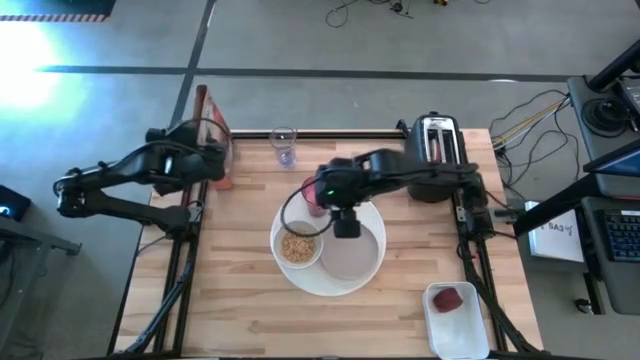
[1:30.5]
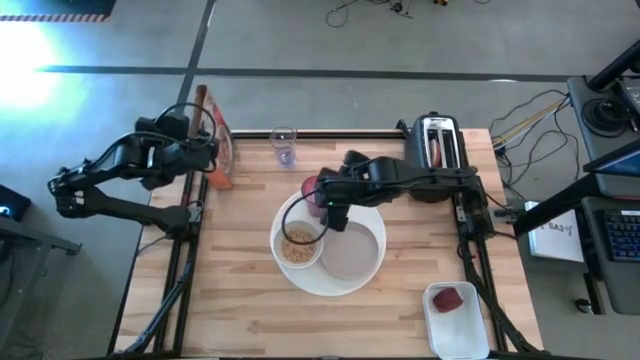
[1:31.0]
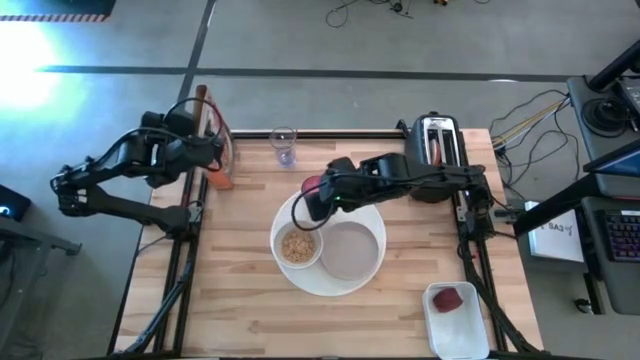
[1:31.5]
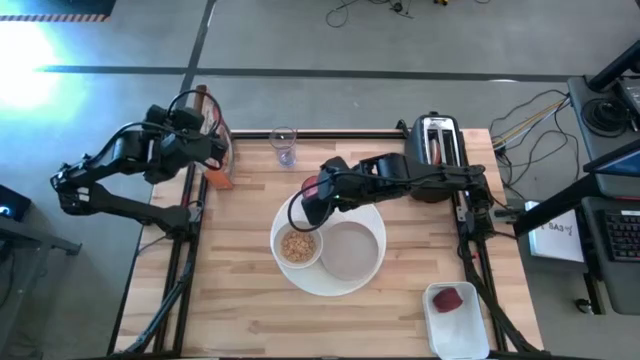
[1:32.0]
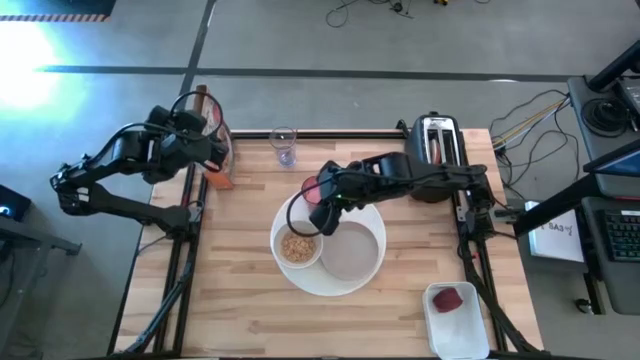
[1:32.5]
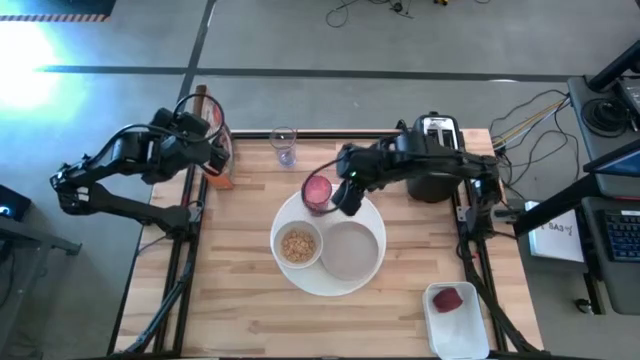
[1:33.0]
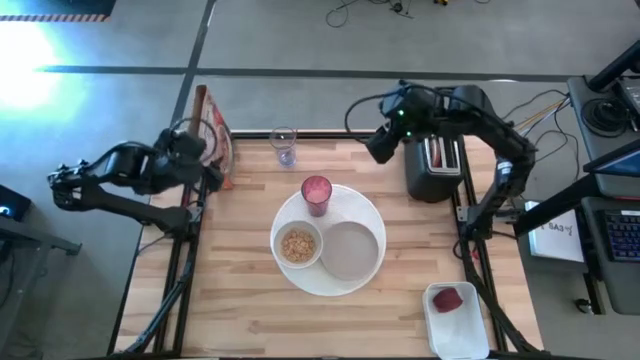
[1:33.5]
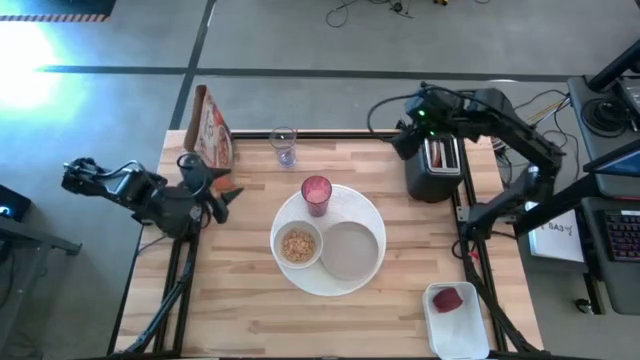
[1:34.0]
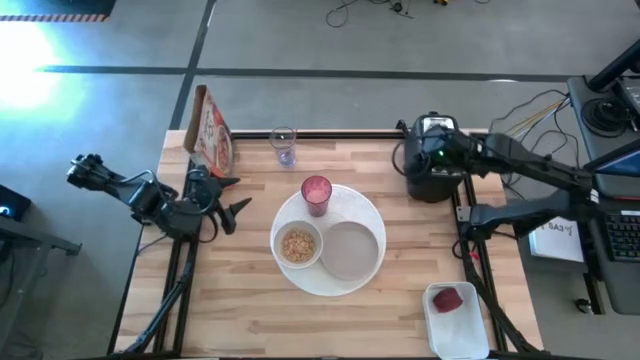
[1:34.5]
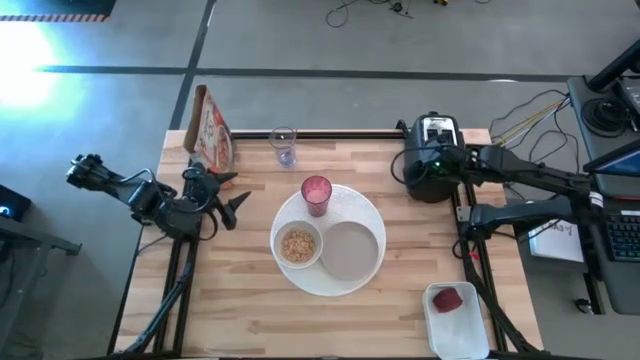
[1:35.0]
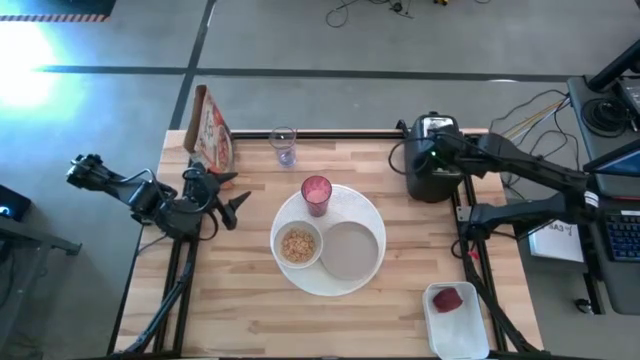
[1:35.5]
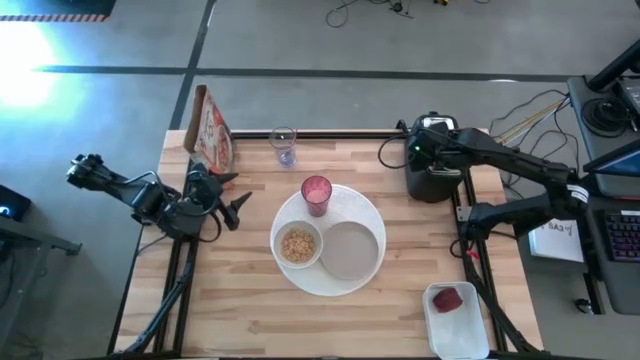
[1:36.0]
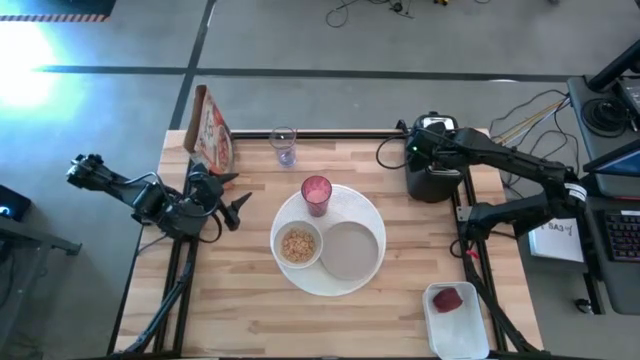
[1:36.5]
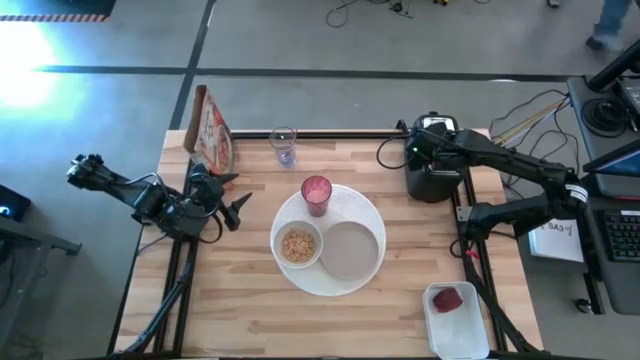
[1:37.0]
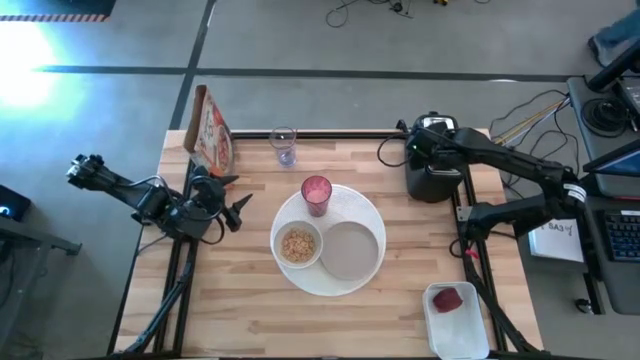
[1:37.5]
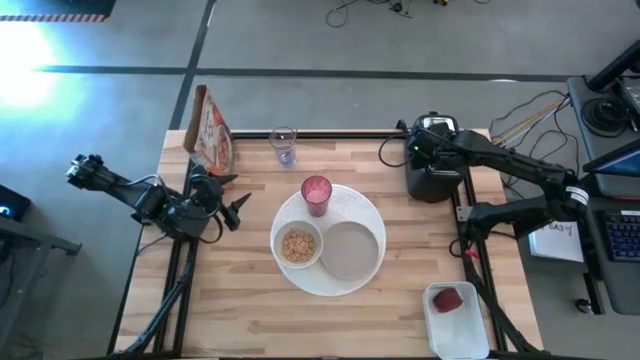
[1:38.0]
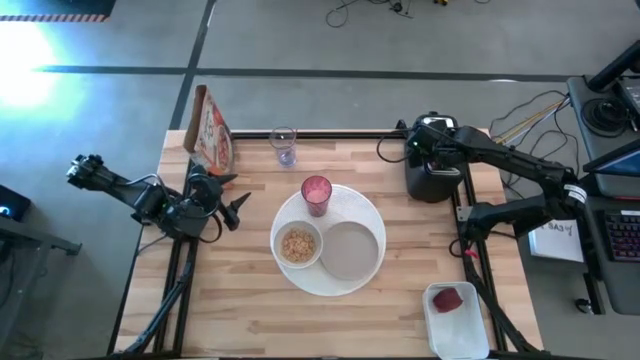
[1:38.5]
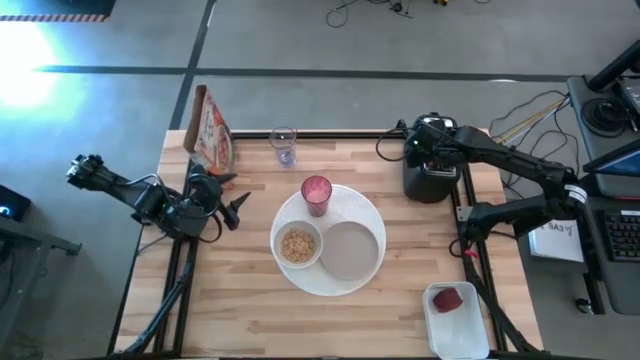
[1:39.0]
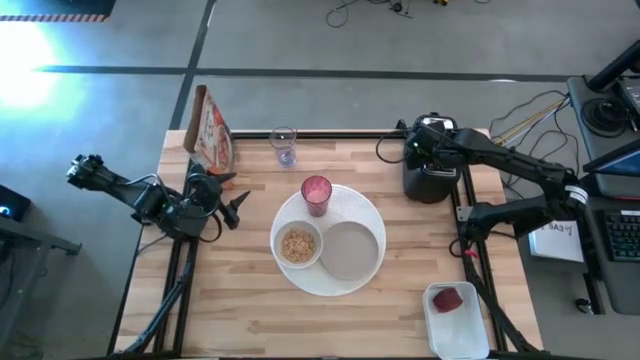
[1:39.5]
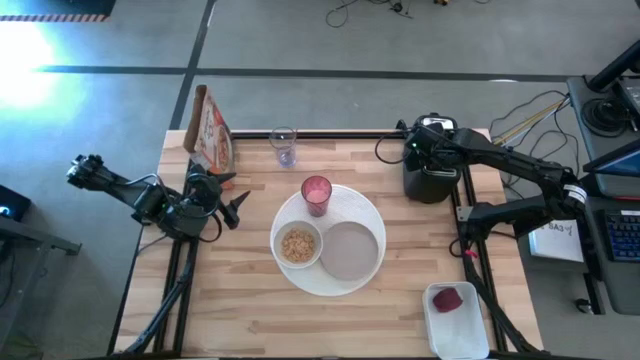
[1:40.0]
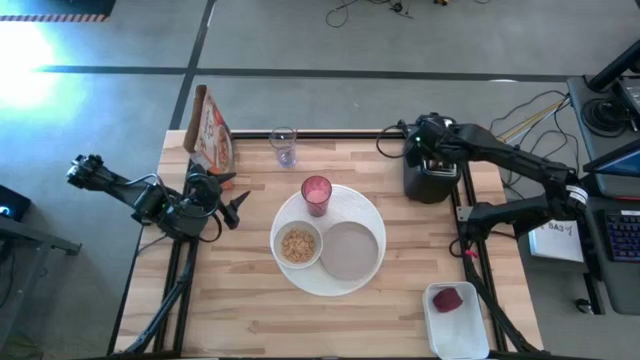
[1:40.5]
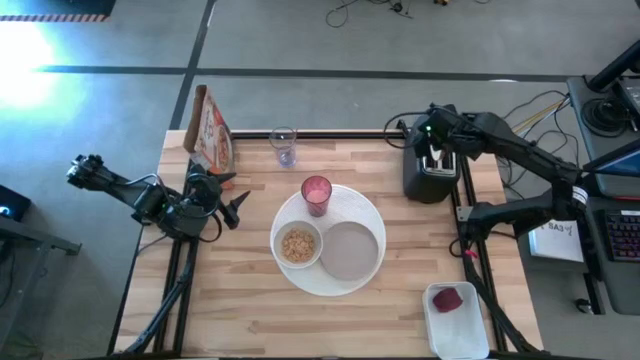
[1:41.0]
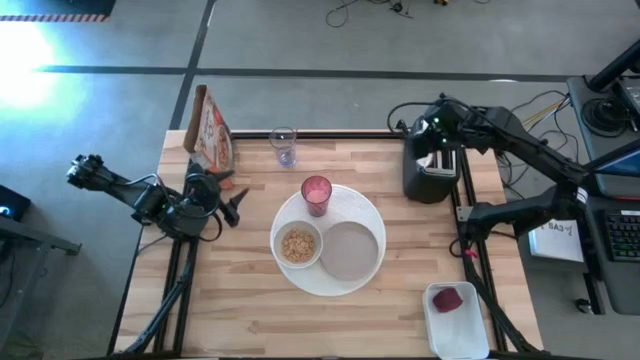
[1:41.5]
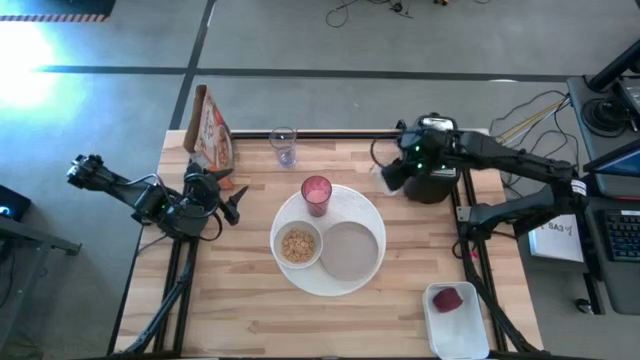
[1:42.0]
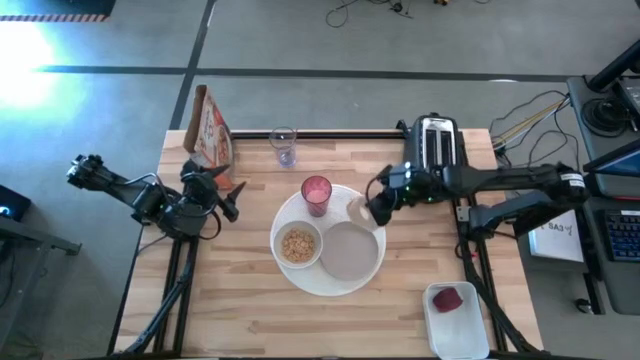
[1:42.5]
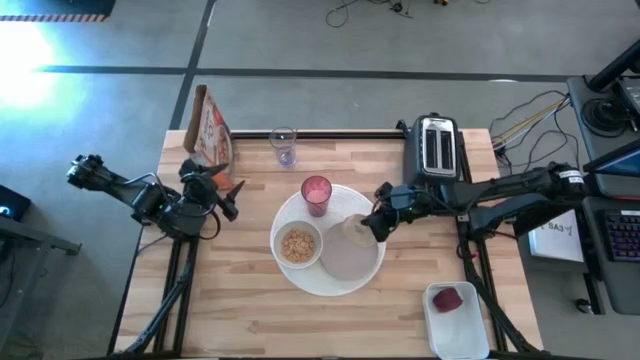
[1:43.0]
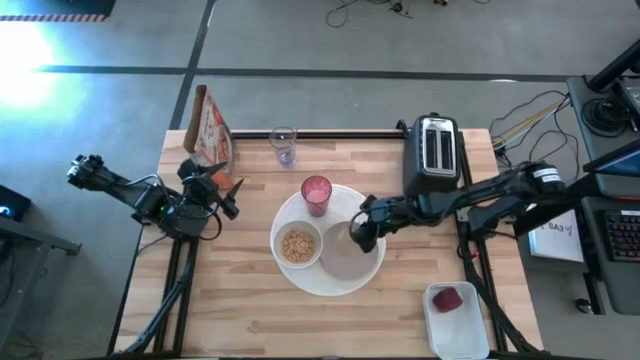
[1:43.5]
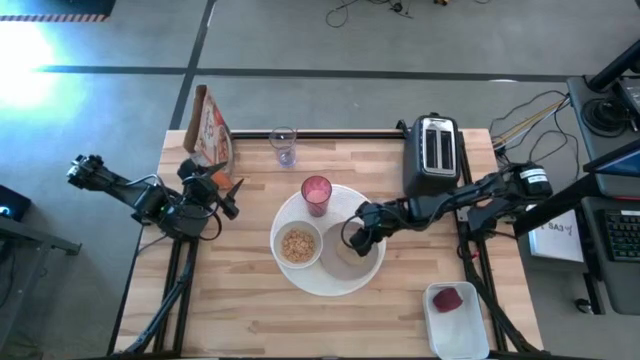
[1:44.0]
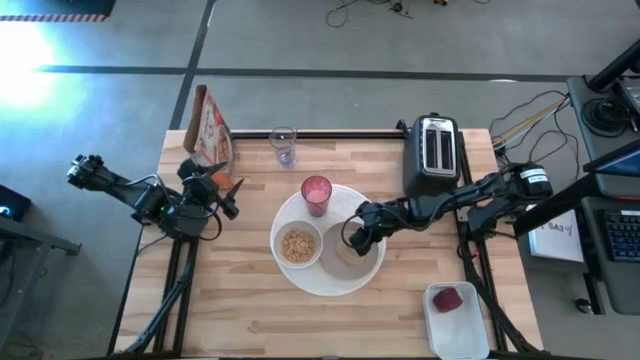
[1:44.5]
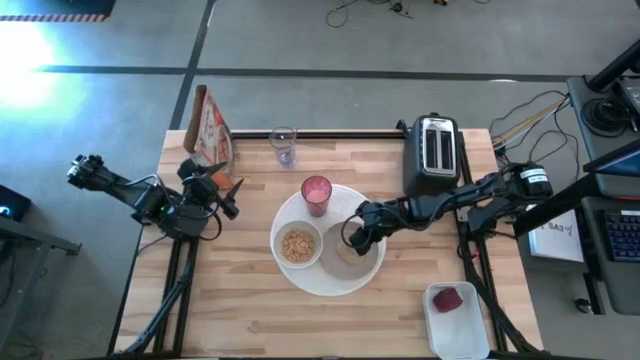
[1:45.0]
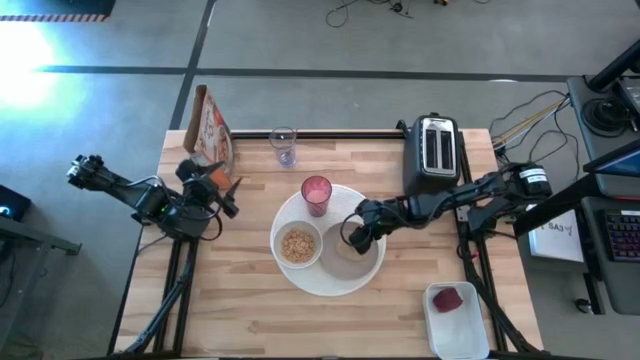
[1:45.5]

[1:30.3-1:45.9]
Task: Arrange a breakfast setting
Put the toasted bagel on top of the gray plate on white table mat

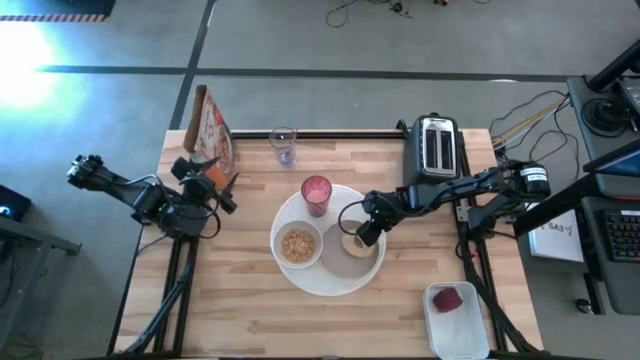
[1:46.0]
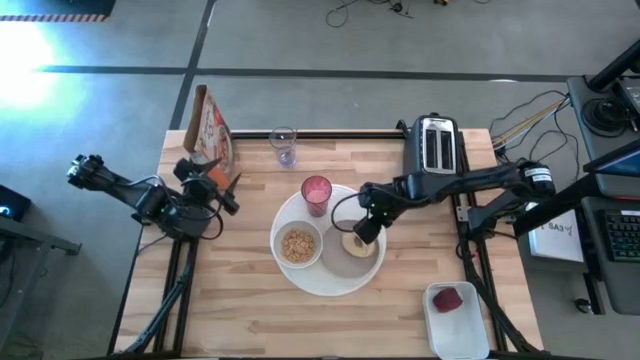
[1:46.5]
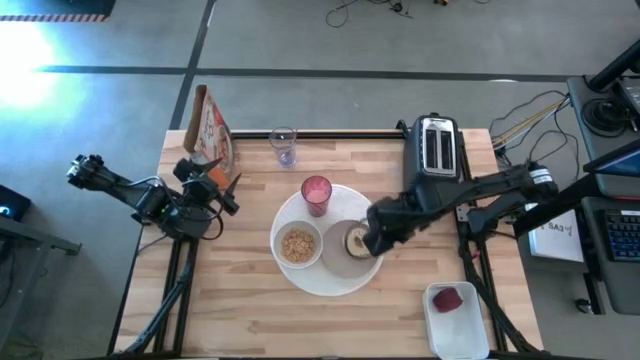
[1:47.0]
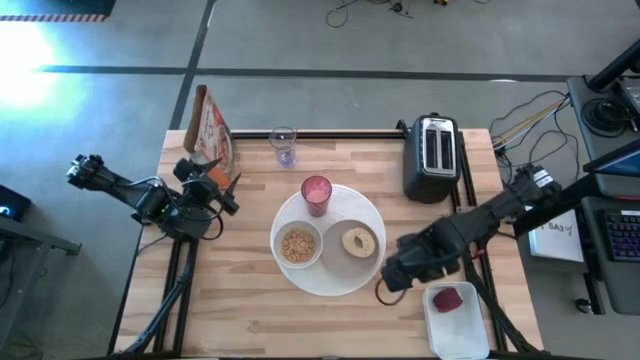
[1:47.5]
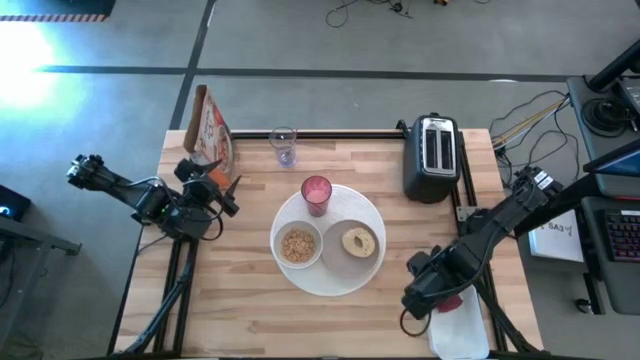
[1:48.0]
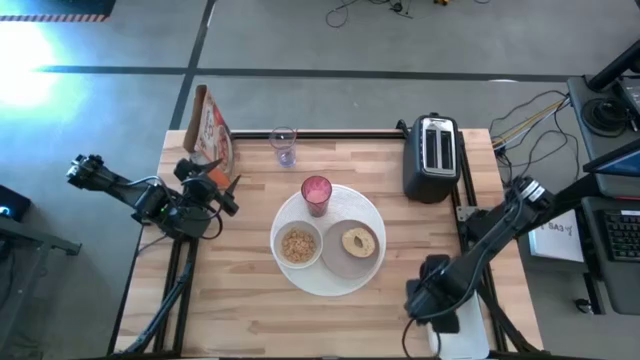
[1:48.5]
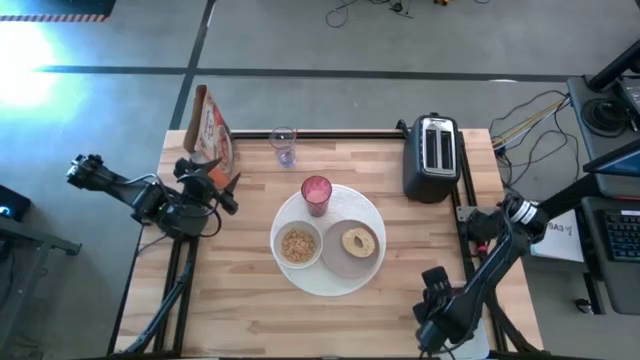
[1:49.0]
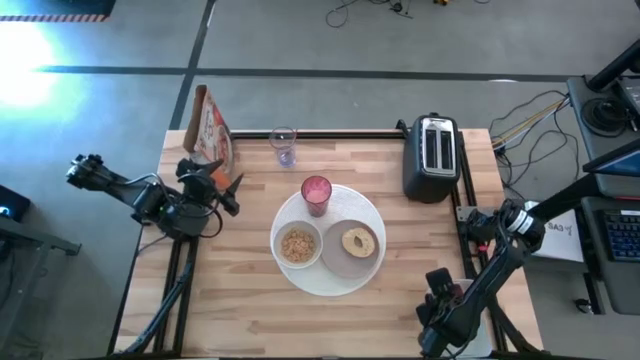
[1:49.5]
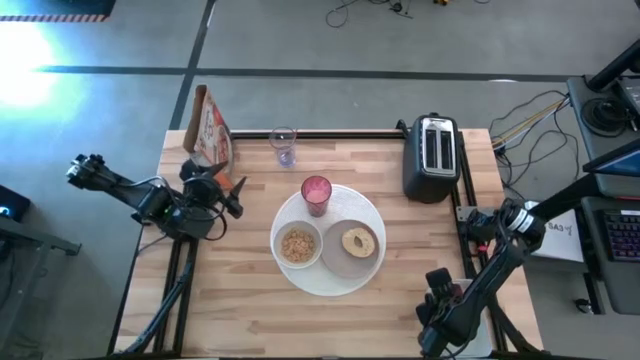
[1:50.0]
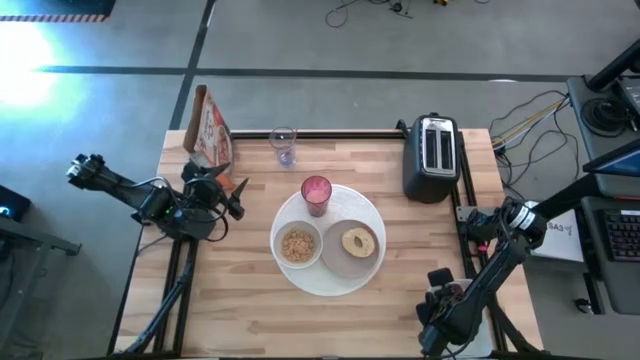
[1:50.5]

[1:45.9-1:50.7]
Put the red apple to the left of the red cup on the white table mat
